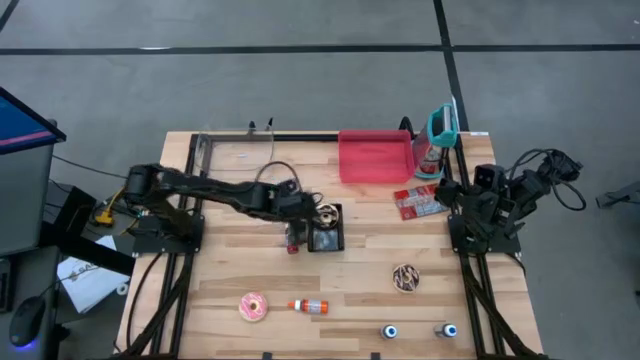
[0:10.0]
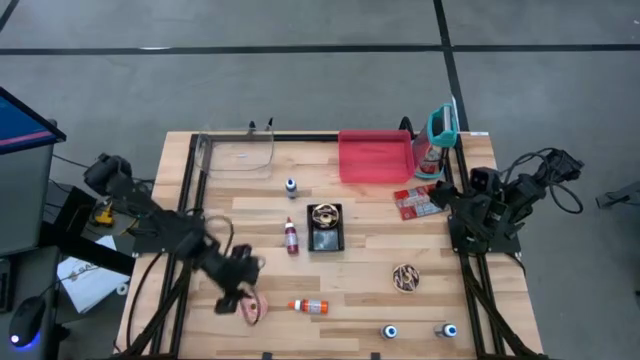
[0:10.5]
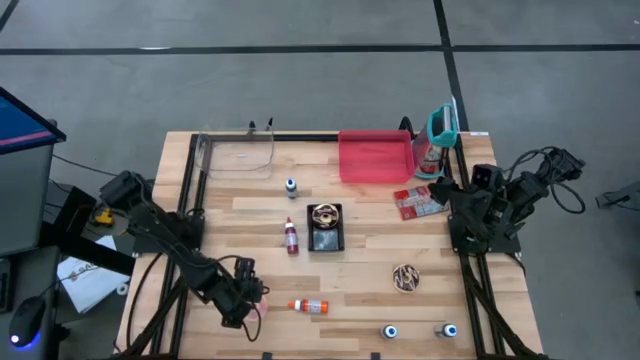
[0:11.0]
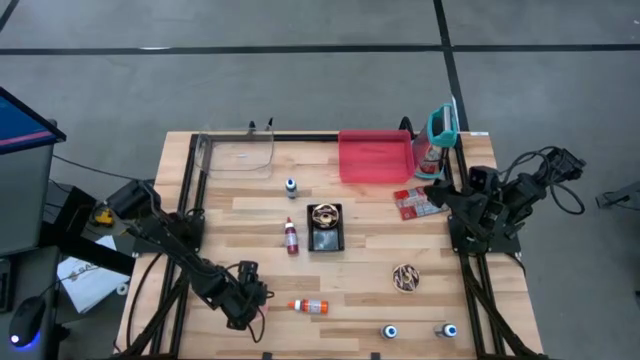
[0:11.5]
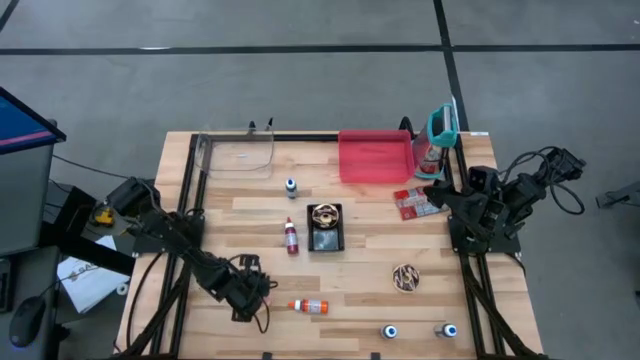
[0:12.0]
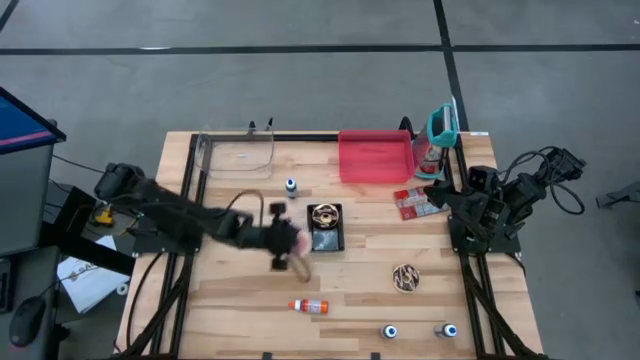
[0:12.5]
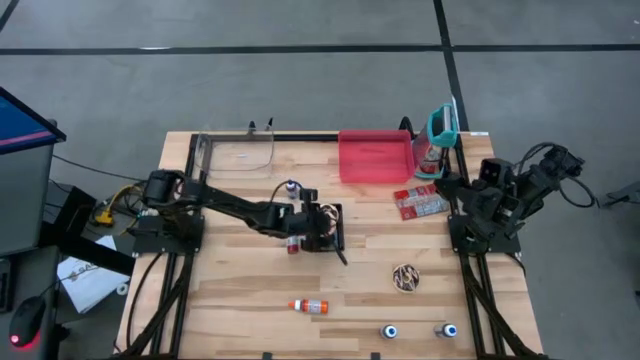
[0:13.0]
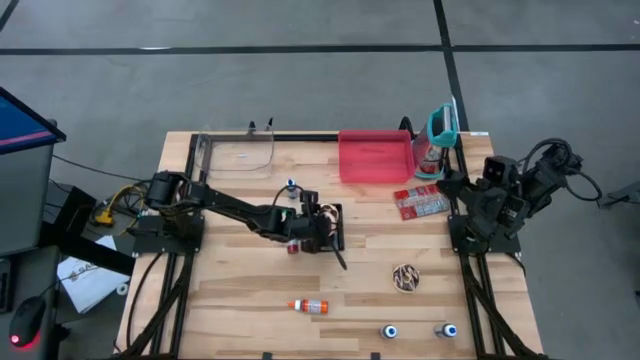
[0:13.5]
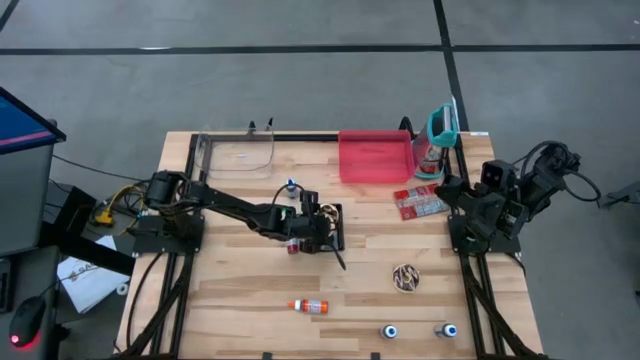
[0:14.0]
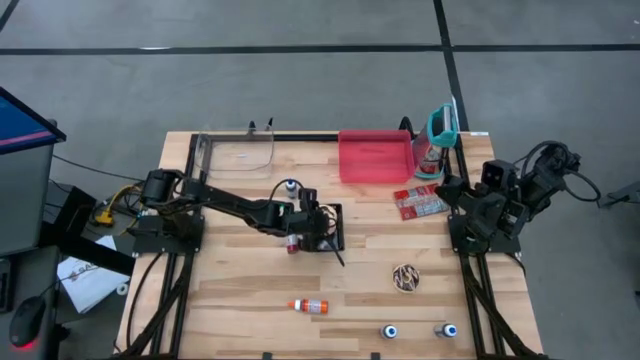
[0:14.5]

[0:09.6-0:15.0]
Put the pink donut into the black basket

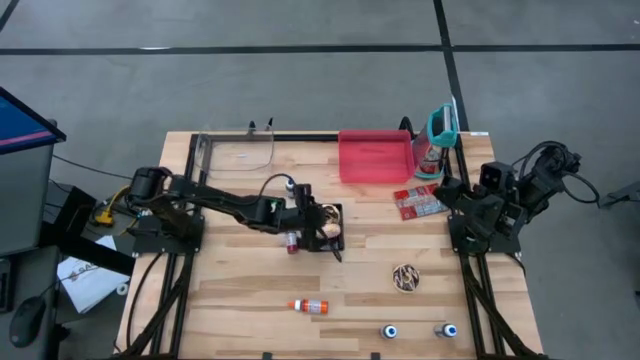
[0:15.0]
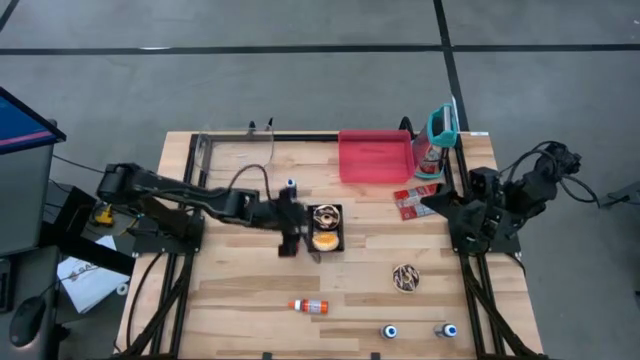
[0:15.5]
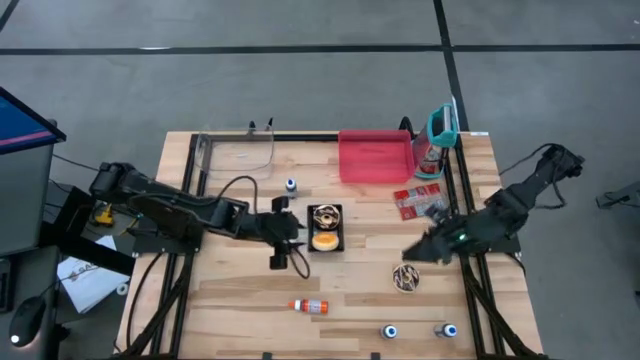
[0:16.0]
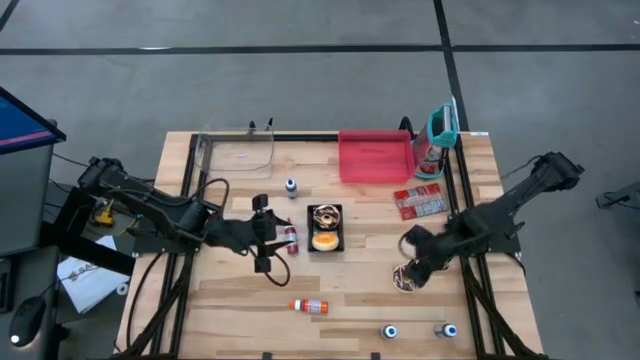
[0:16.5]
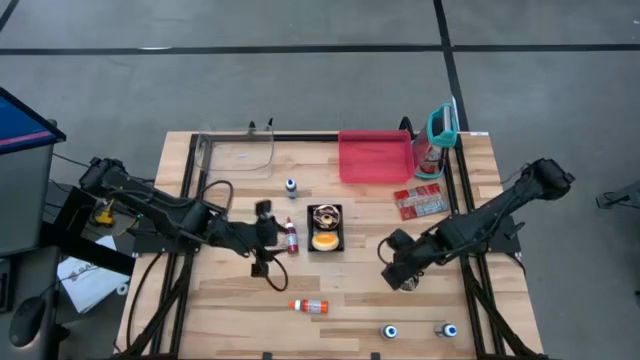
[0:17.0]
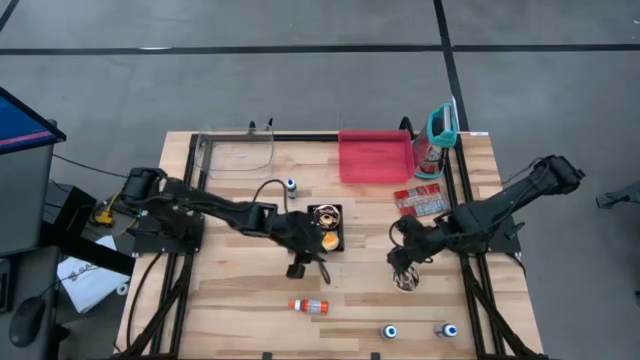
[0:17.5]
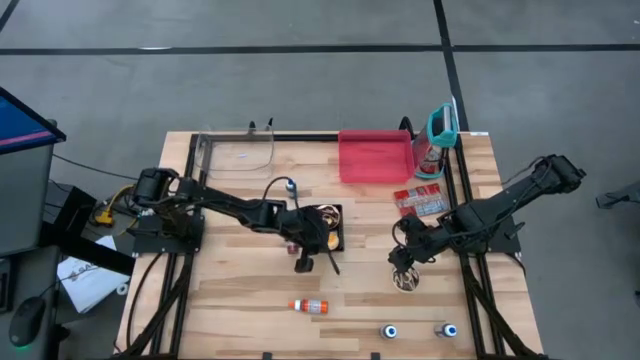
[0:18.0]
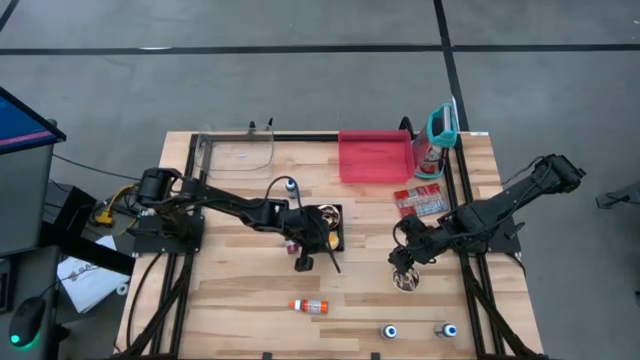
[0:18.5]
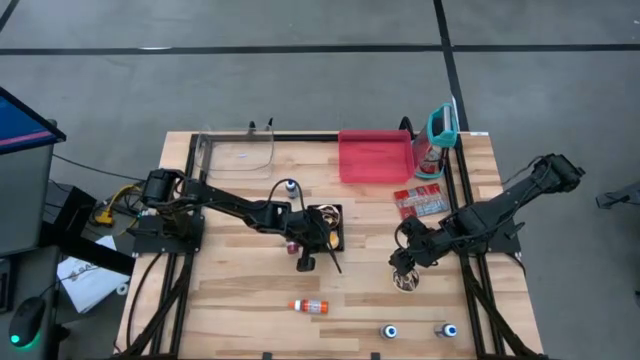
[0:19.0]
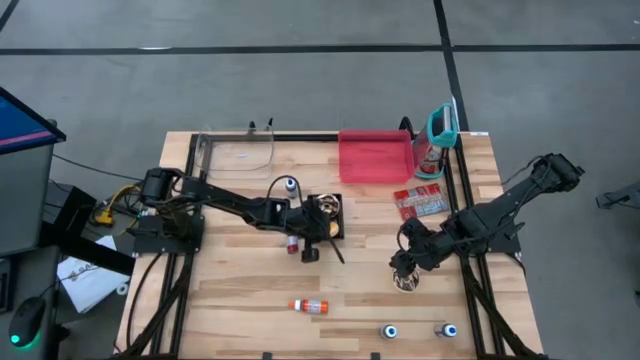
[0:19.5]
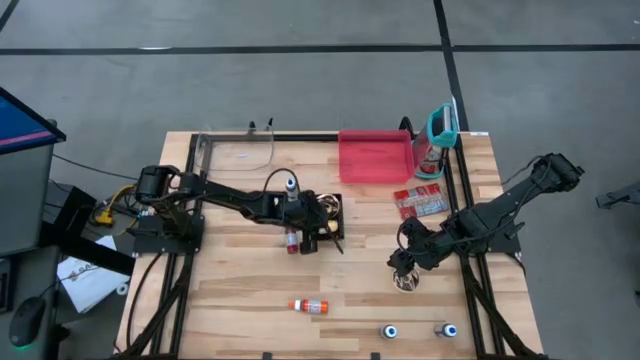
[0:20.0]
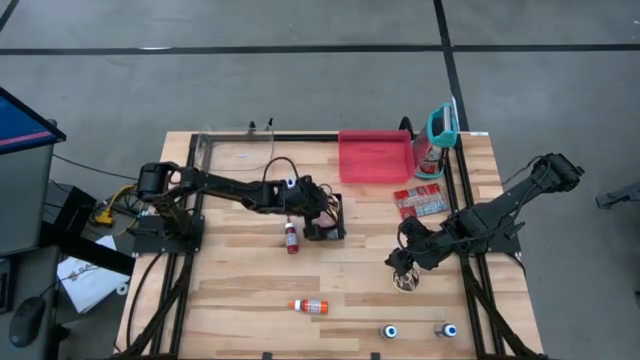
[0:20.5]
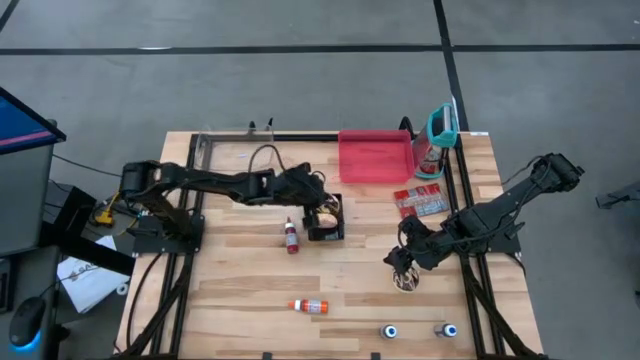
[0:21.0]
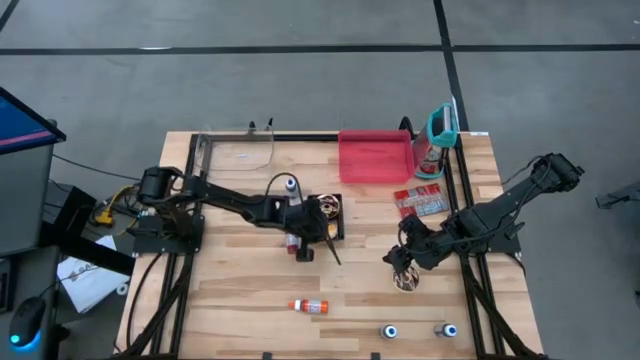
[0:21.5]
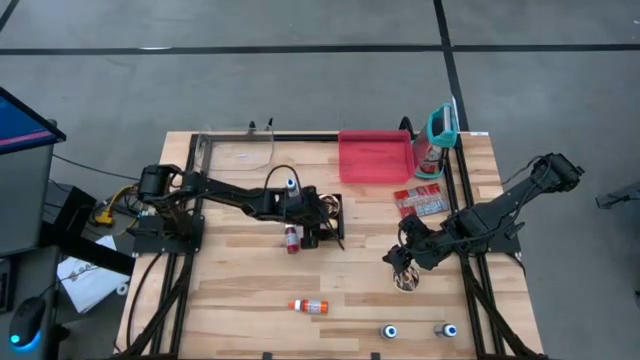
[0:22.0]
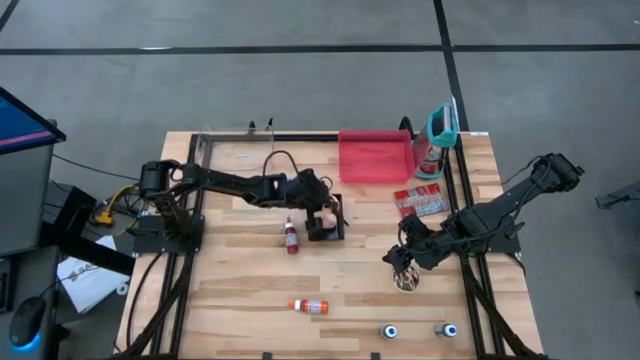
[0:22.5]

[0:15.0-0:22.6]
Put the pink donut in the black basket

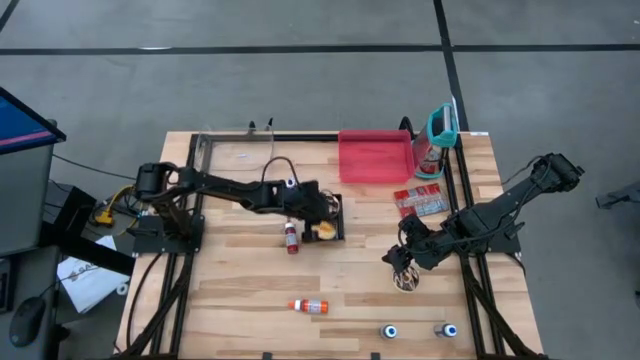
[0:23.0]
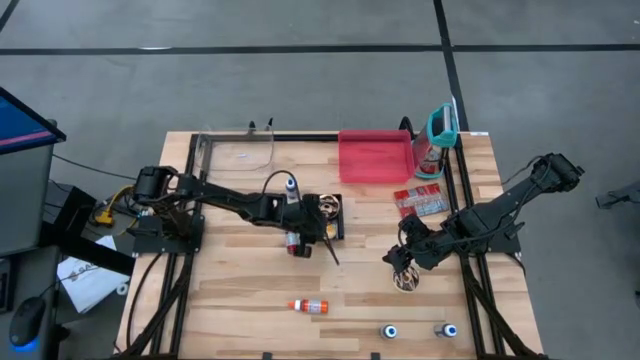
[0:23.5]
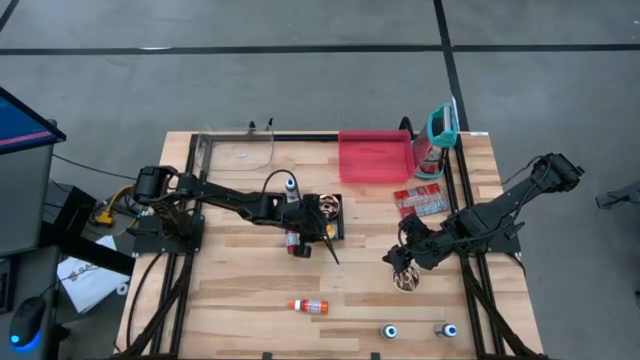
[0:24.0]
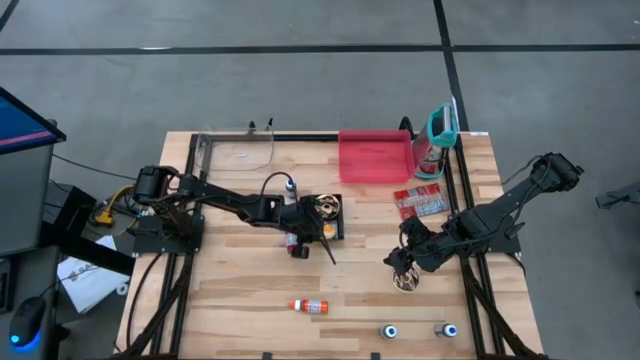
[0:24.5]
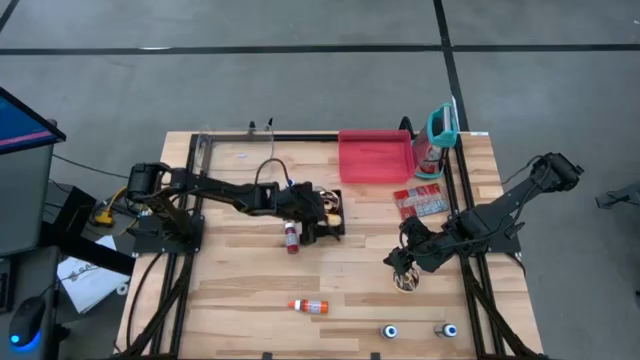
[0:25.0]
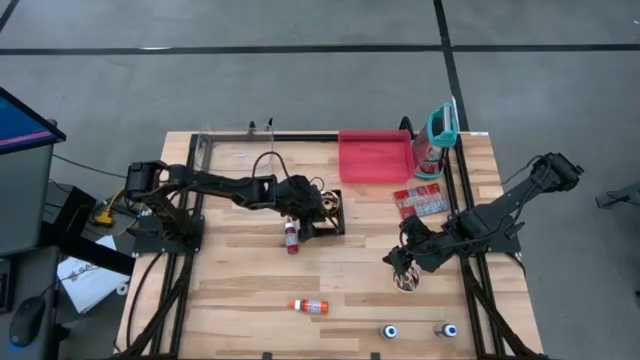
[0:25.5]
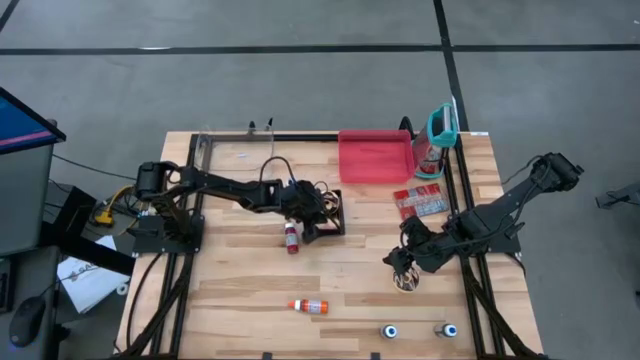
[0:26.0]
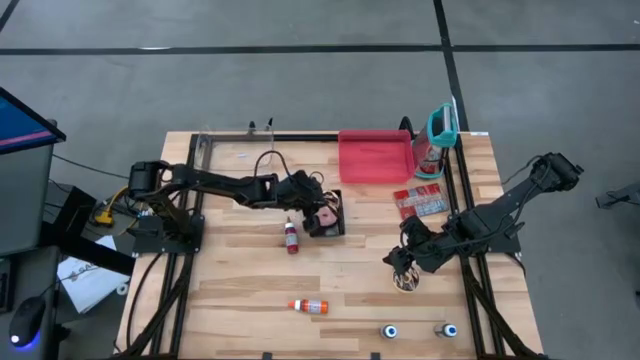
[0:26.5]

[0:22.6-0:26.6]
Put the pink donut in the black basket

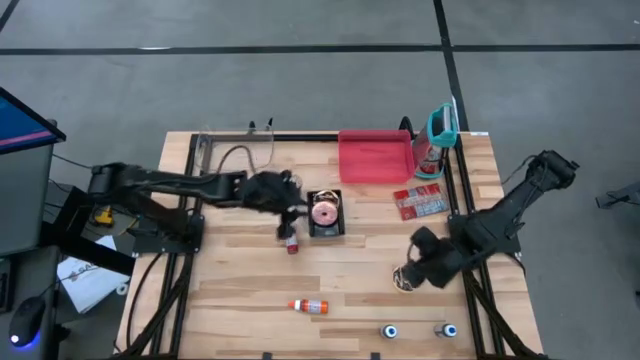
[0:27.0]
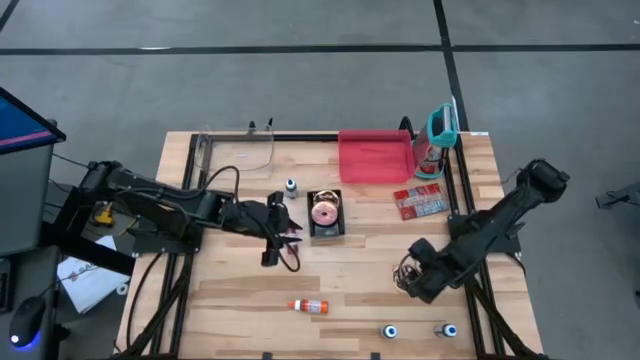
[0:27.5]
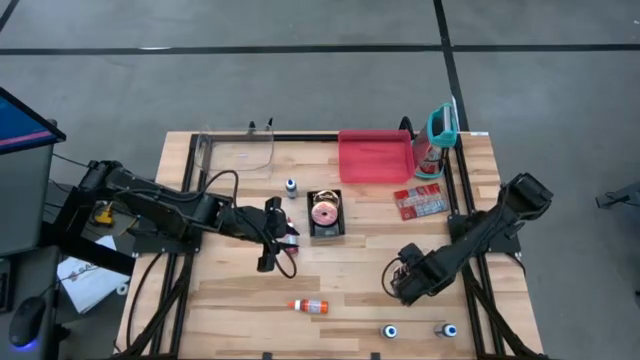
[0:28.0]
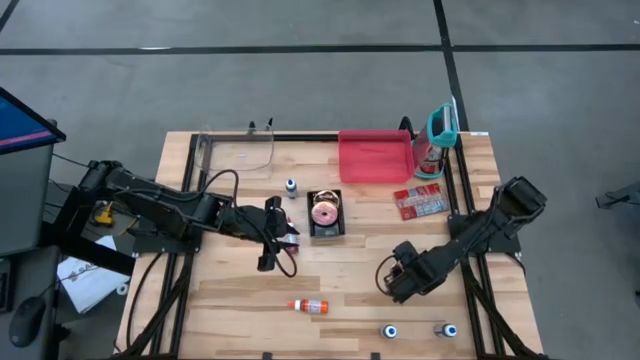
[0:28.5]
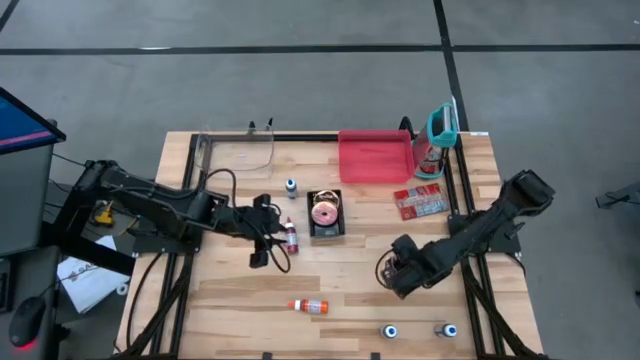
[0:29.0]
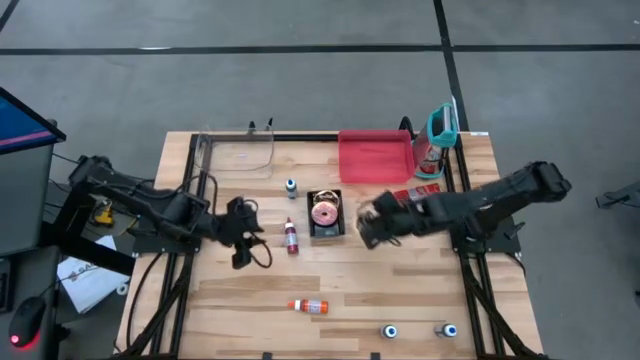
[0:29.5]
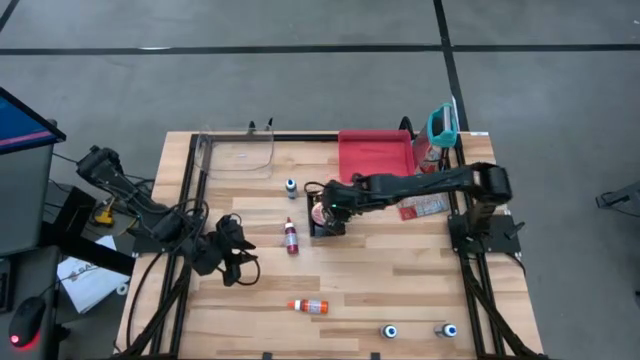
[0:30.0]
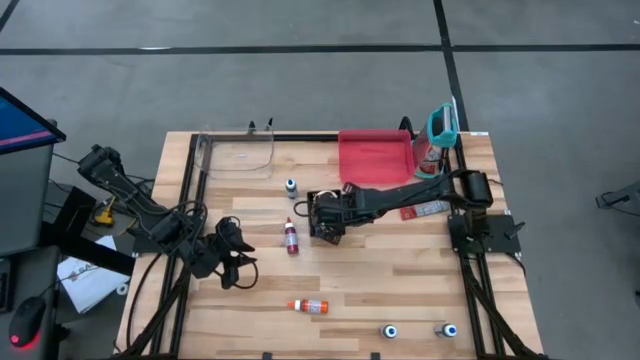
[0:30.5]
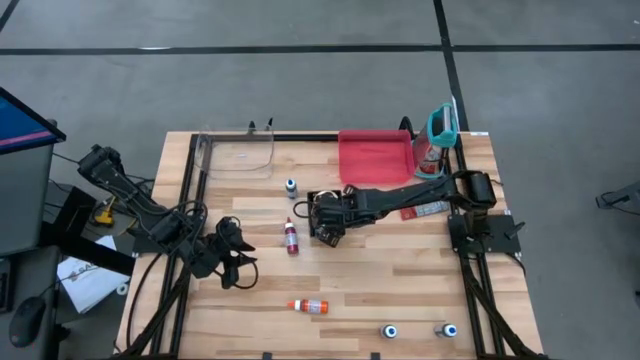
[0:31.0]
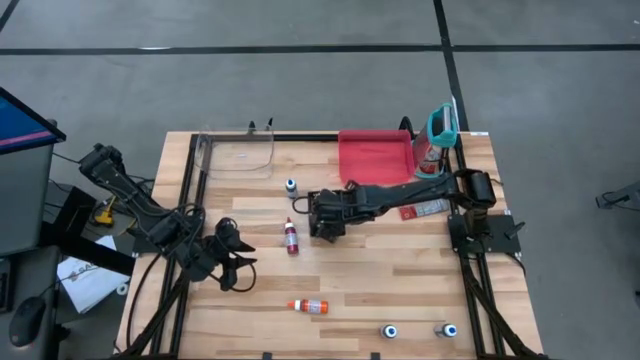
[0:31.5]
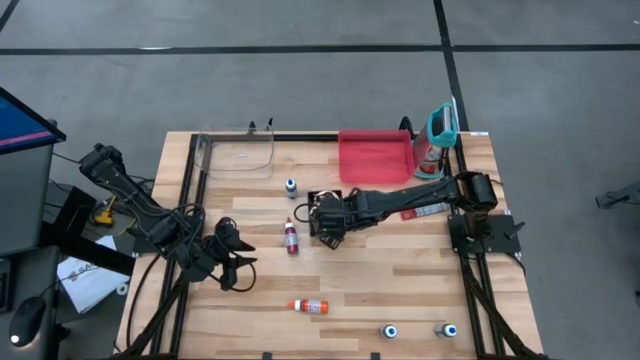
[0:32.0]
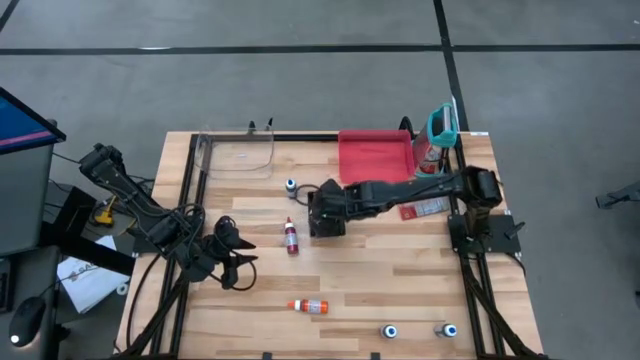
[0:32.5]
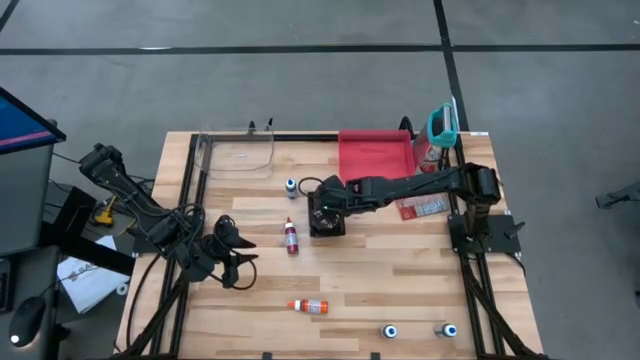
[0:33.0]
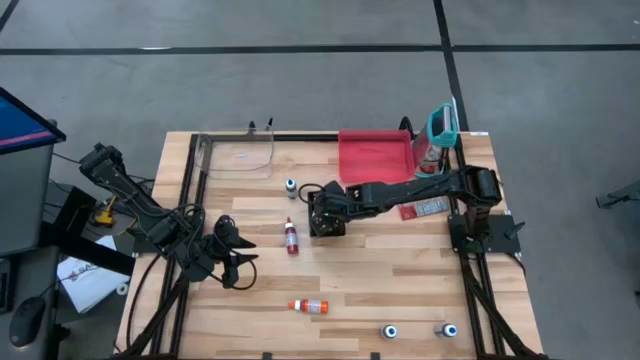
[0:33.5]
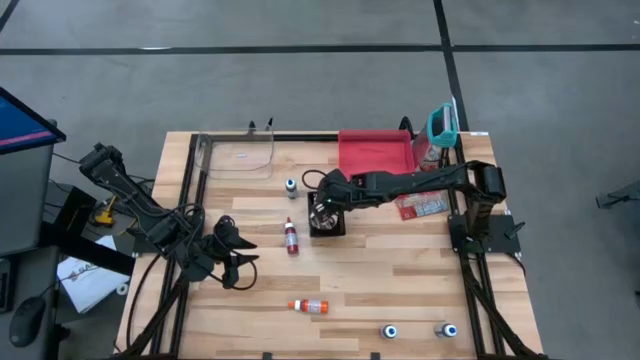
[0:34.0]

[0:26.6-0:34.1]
Put the black donut into the black basket
